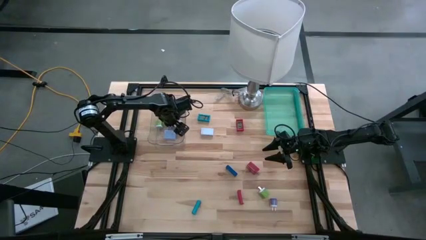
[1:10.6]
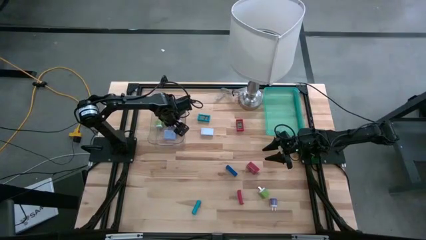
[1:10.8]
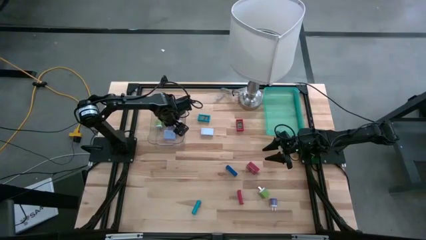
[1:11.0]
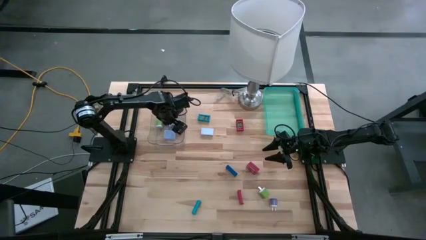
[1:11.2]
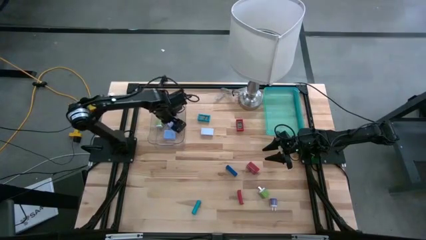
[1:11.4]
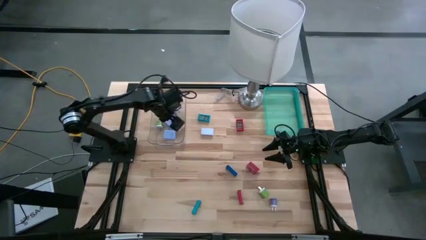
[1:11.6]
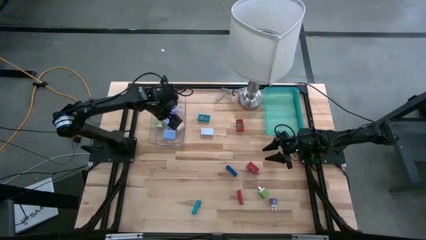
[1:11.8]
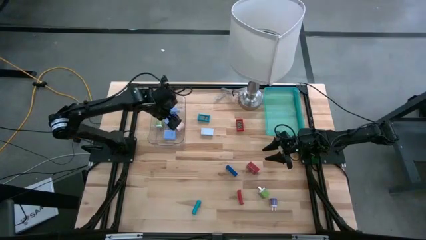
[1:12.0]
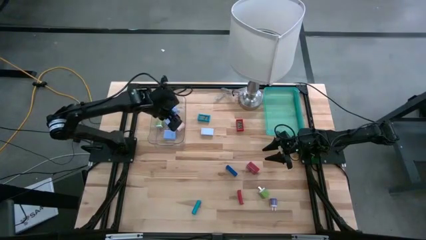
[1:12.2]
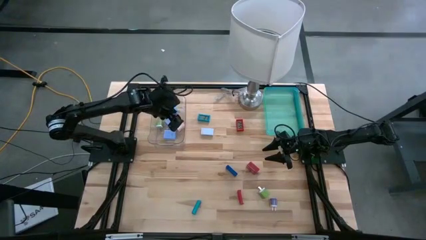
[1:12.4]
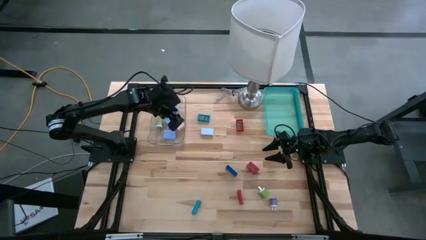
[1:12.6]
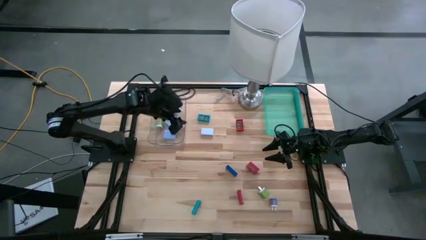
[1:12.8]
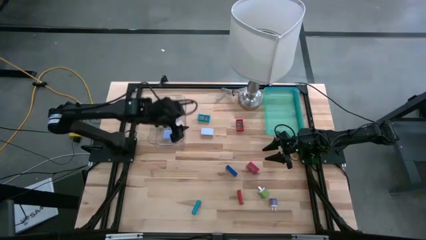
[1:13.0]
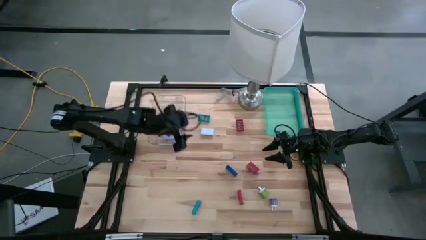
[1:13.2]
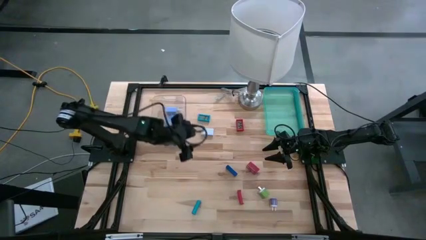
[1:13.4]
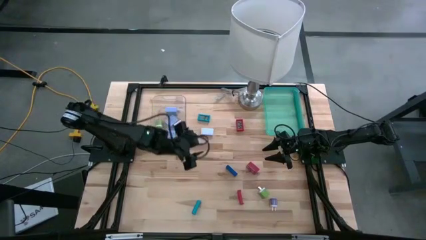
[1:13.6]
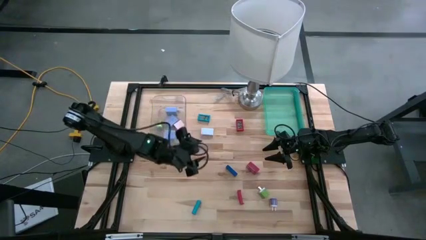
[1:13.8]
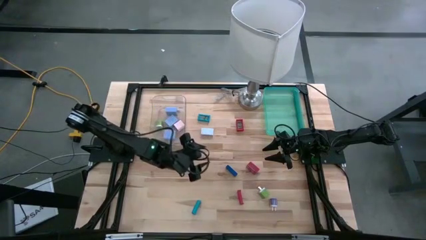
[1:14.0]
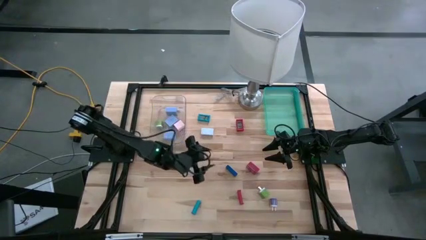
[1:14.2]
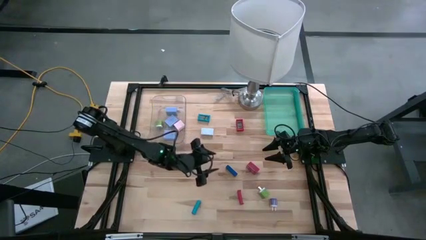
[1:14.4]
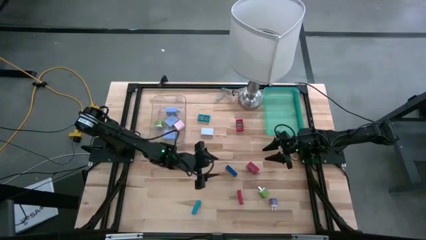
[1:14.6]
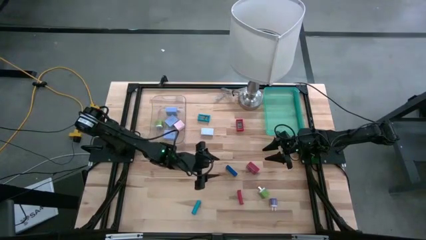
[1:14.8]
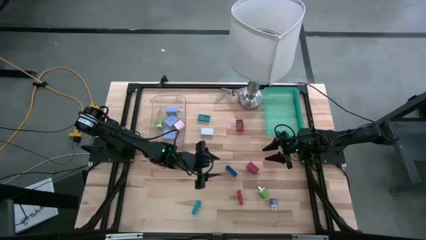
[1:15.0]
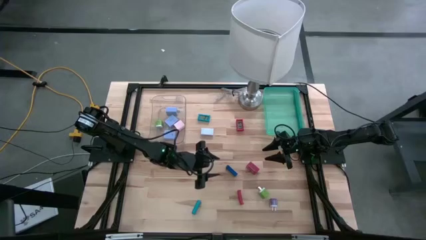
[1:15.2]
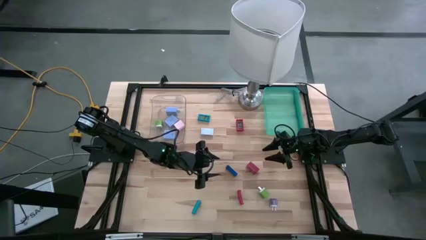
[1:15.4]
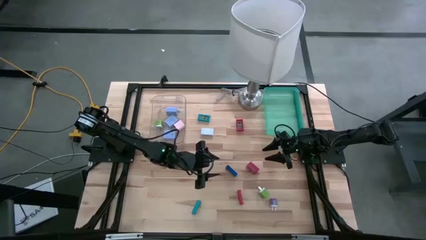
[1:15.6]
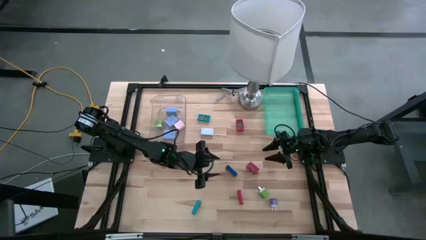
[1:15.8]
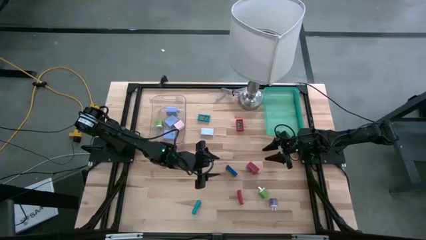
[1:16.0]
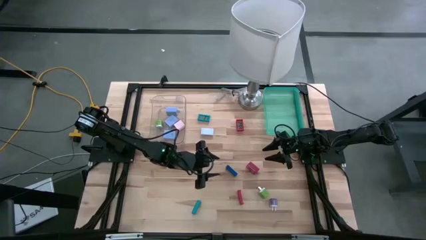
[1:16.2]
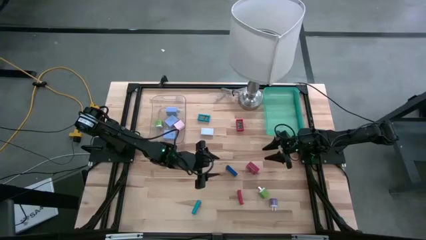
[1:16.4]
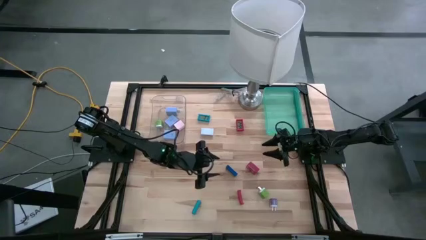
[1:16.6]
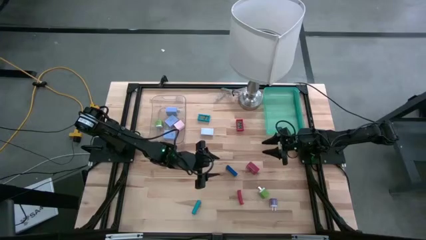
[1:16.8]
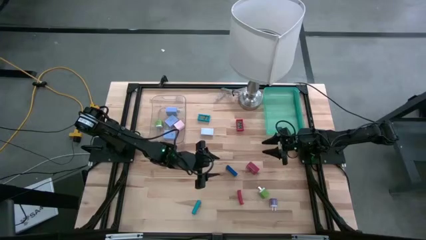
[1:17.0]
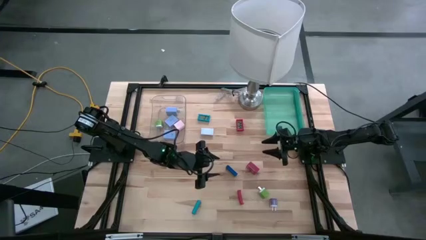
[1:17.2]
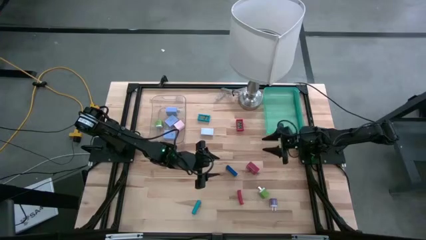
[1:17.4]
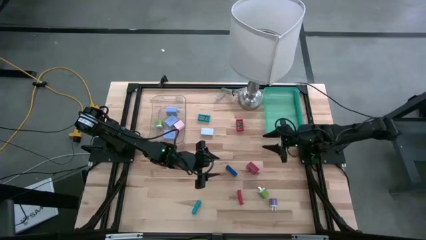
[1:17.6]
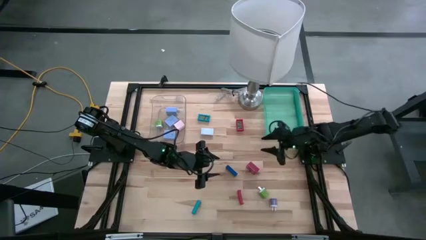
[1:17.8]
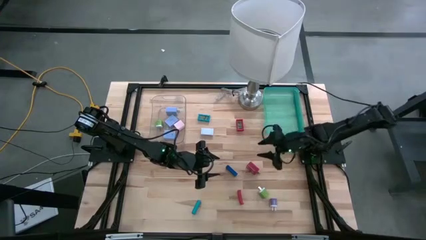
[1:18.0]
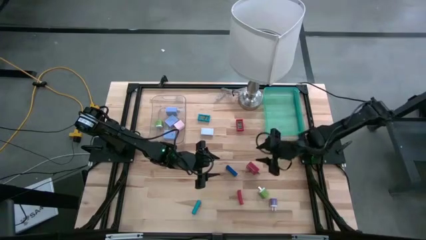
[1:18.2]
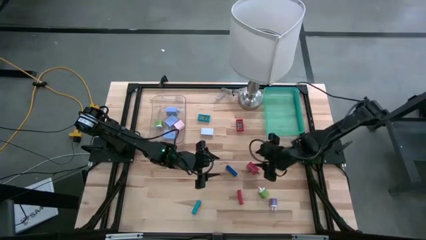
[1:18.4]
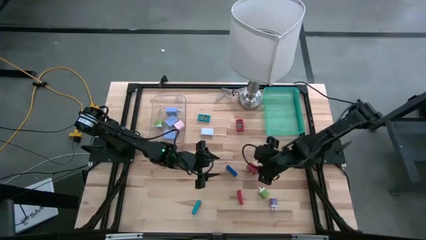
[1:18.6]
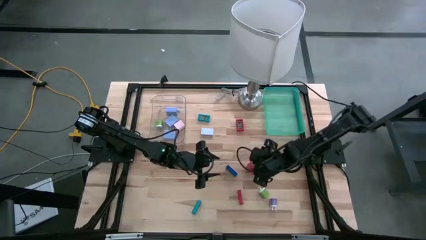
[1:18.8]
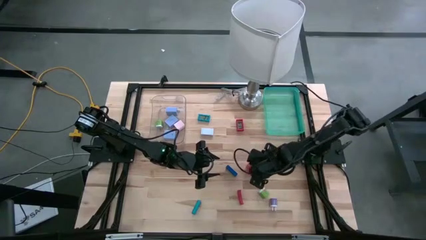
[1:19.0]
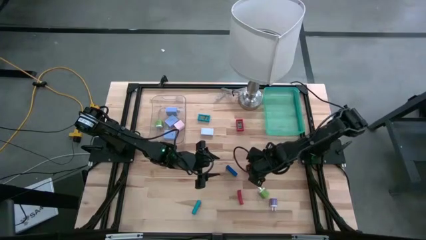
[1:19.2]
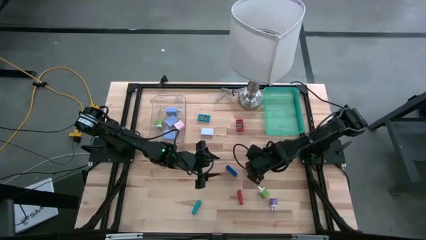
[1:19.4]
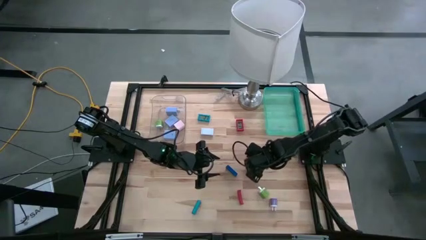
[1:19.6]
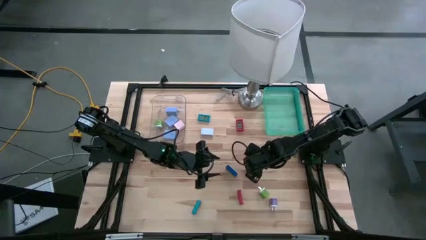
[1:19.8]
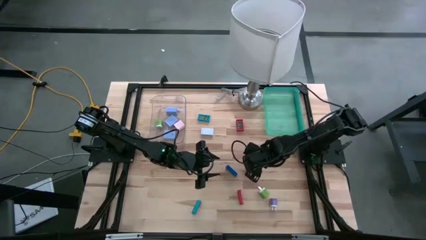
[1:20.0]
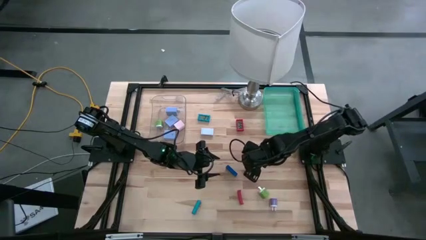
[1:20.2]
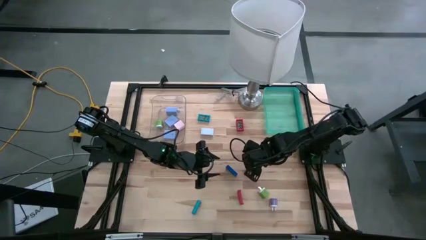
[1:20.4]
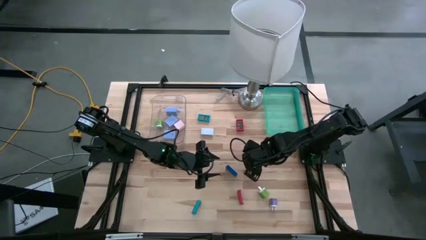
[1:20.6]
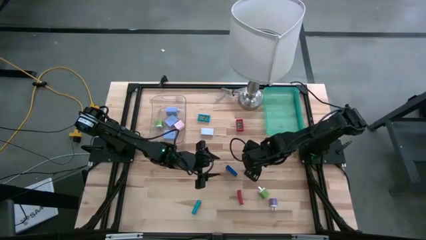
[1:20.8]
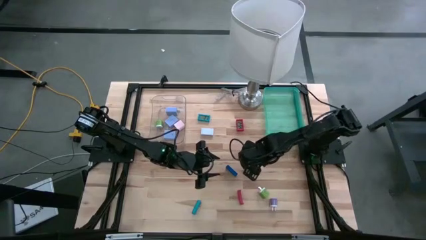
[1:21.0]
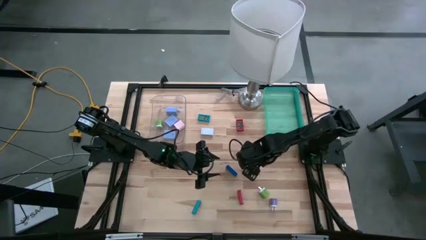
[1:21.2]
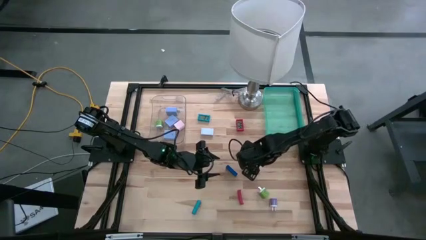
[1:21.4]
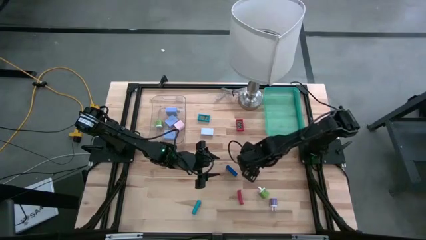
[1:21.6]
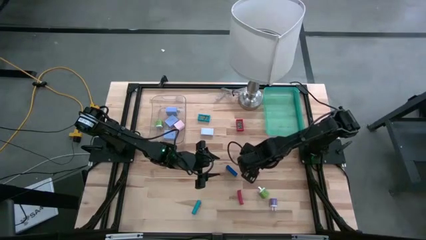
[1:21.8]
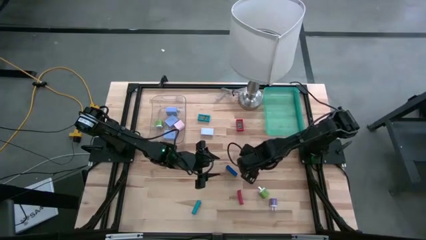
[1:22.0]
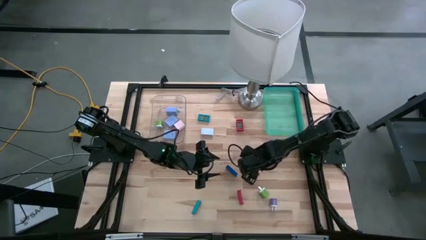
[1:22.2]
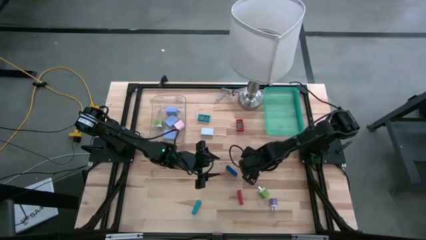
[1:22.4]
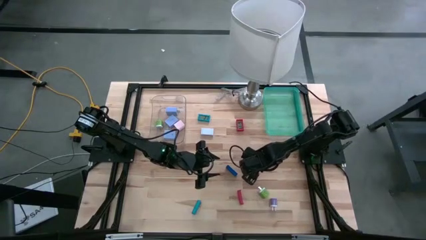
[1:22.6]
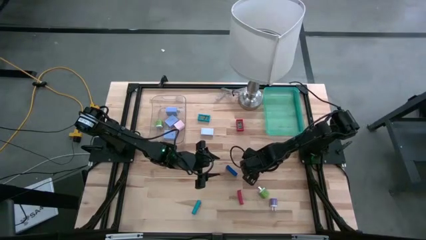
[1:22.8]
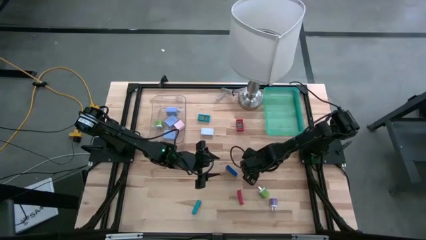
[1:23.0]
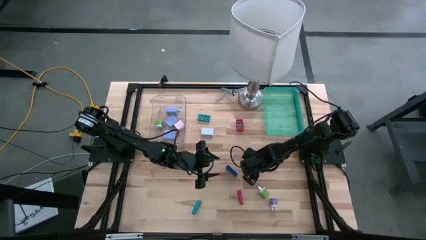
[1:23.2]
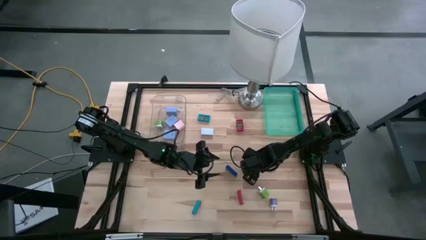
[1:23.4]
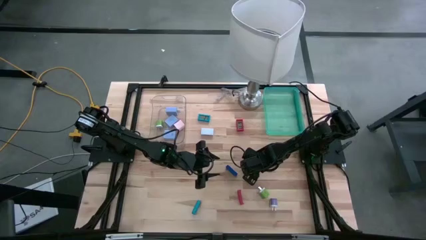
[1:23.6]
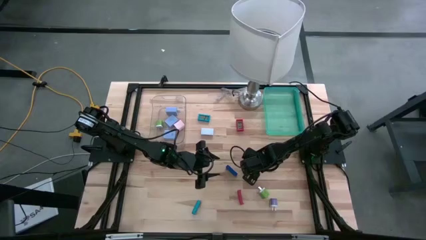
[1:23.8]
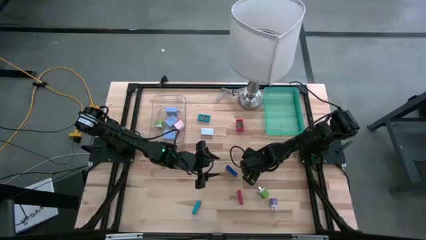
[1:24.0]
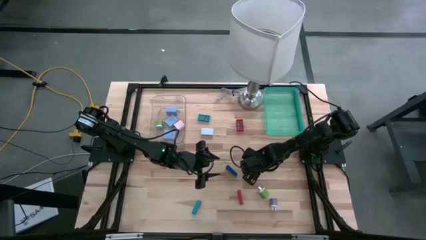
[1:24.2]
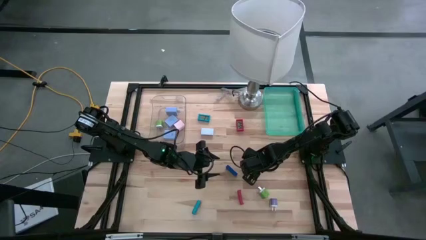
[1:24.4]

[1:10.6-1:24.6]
Task: Pick & Place Office items
Put the red charger adapter into the transparent bin

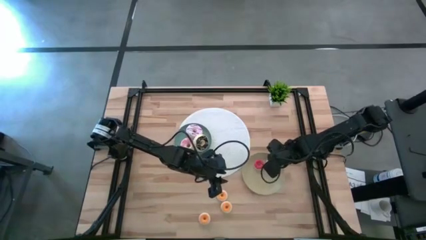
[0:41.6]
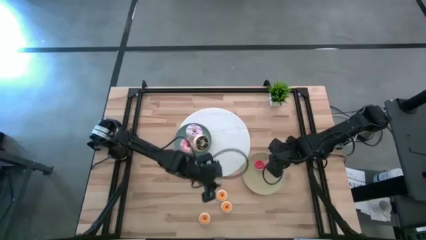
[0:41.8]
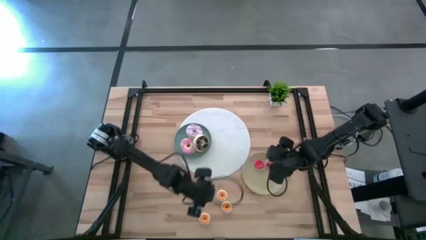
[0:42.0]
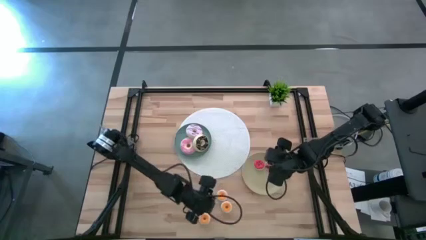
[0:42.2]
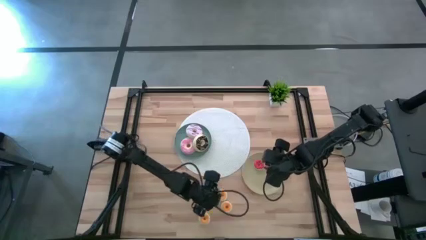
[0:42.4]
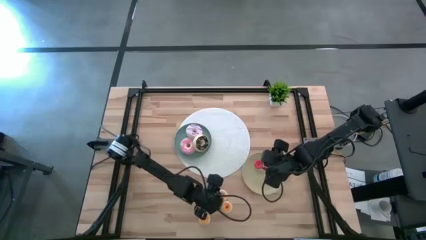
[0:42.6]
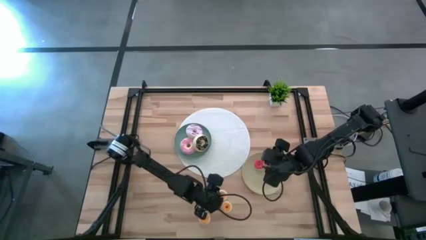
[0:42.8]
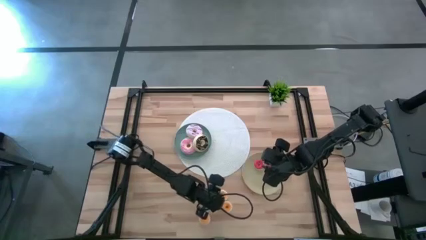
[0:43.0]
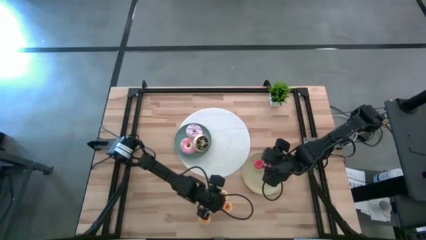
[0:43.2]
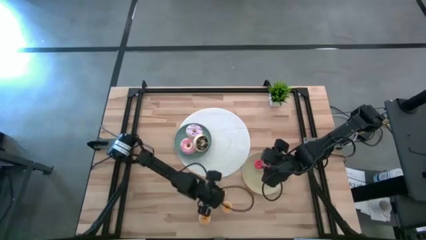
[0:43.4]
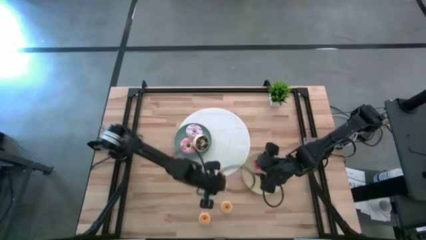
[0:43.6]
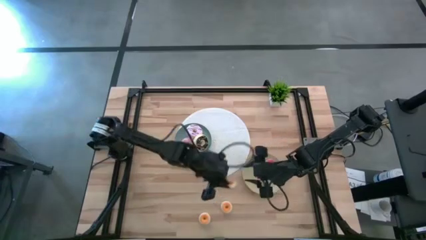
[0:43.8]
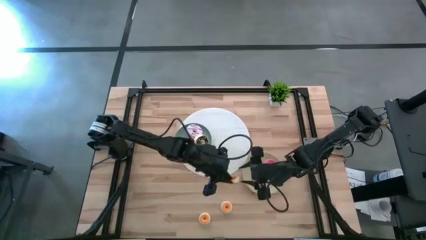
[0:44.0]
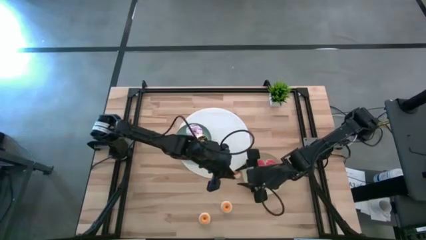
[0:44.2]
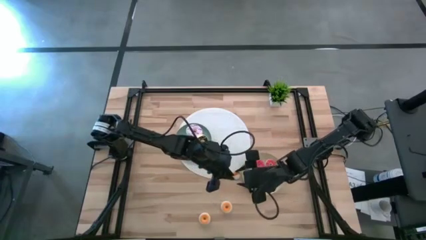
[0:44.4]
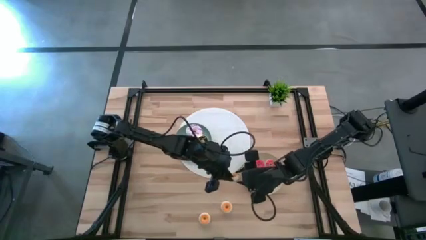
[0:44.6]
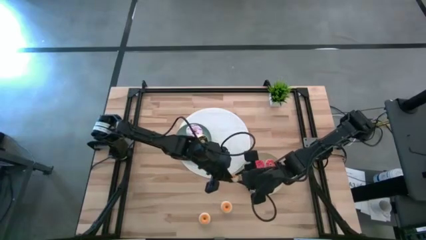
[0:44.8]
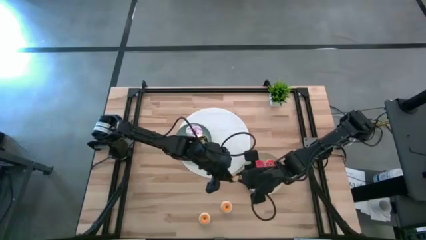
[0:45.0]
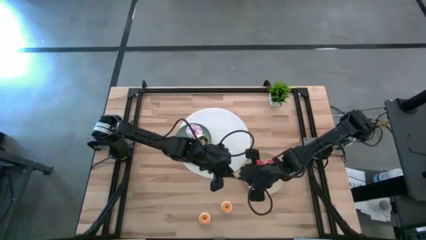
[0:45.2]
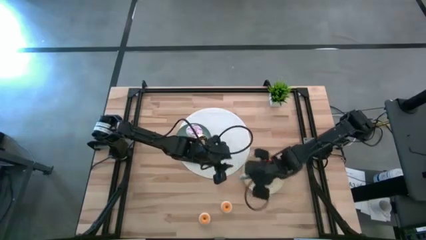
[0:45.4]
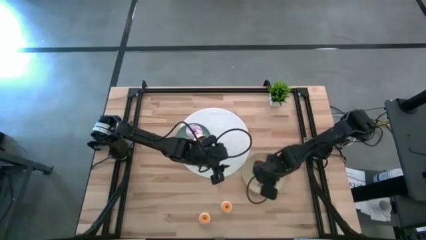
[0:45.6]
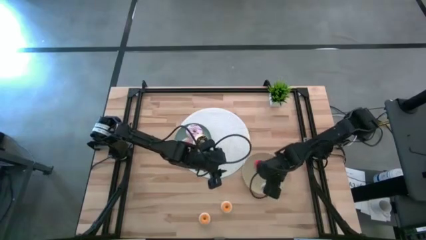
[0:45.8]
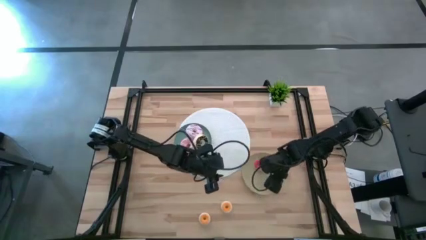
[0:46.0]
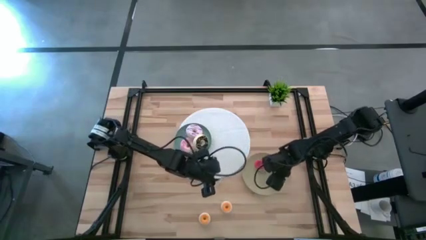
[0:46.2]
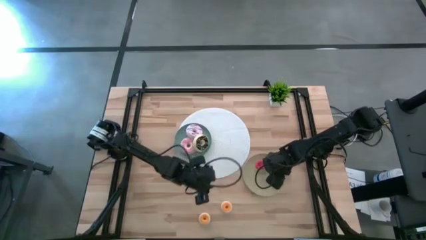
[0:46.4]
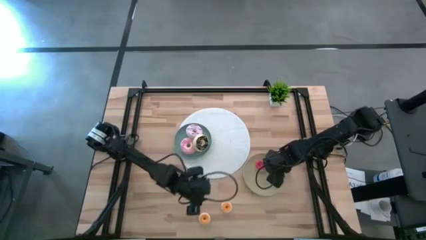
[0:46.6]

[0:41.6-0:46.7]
Task: Pick & Place donuts
Put the small blue donut on the brown plate
